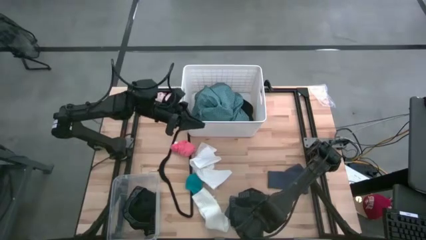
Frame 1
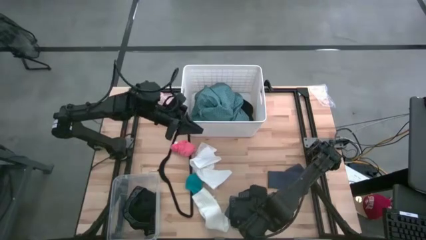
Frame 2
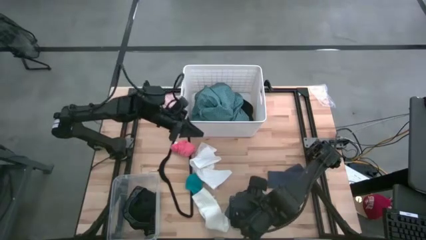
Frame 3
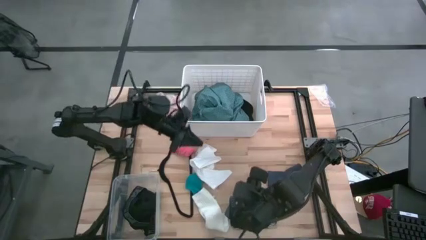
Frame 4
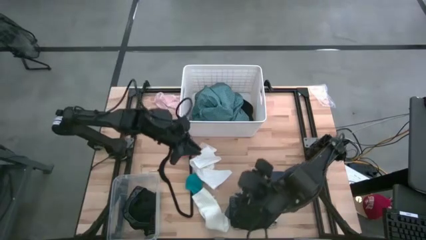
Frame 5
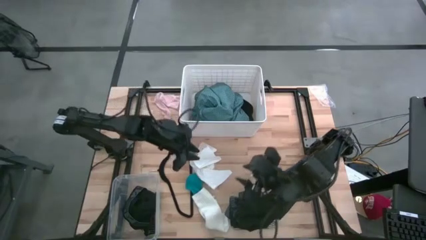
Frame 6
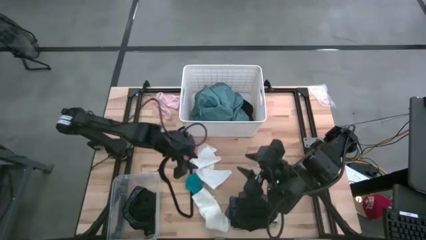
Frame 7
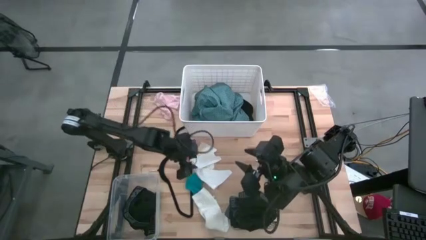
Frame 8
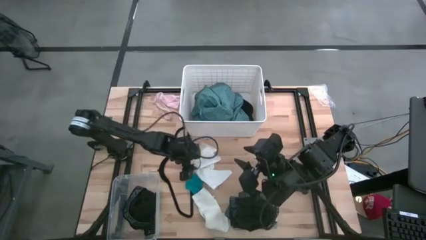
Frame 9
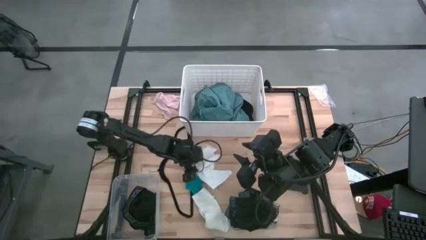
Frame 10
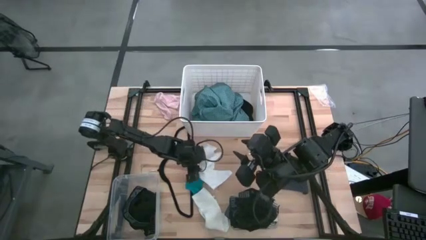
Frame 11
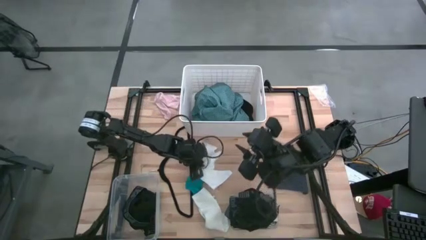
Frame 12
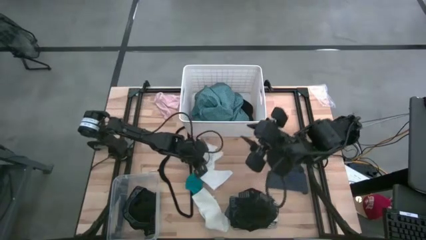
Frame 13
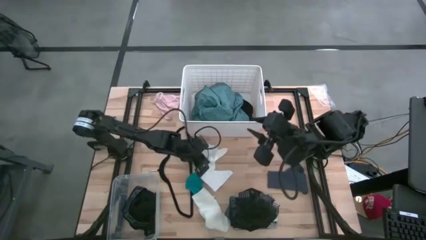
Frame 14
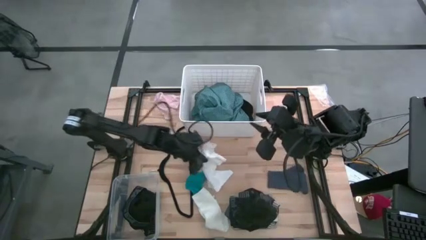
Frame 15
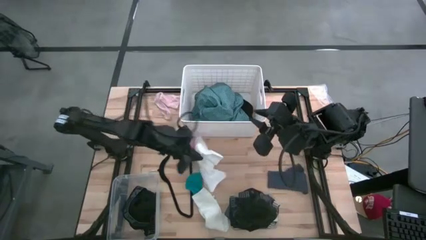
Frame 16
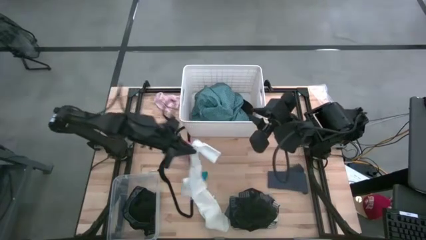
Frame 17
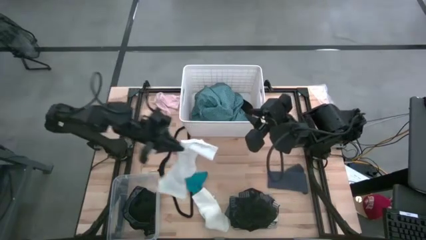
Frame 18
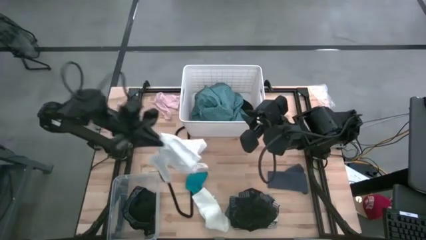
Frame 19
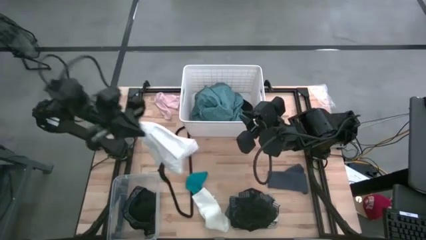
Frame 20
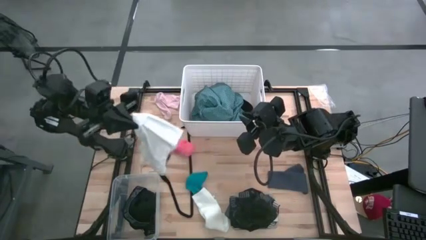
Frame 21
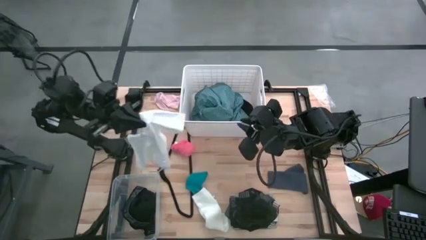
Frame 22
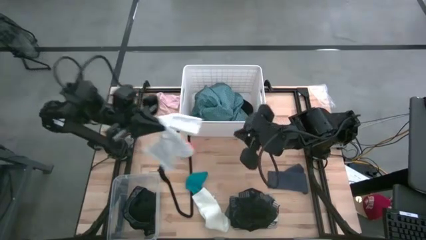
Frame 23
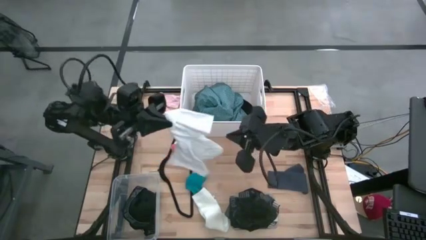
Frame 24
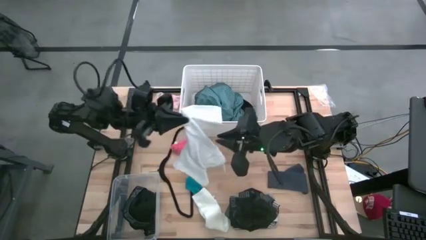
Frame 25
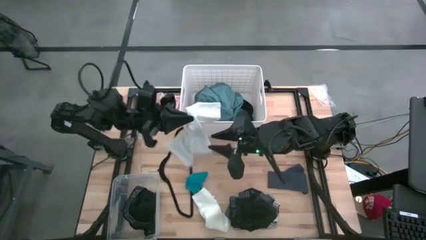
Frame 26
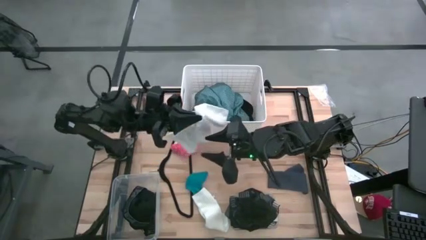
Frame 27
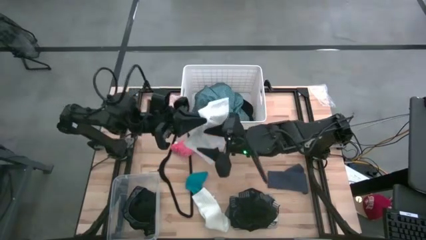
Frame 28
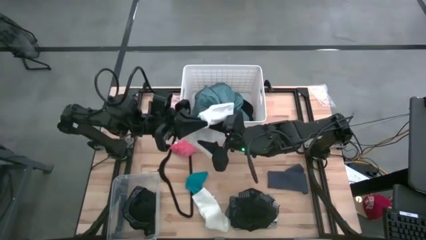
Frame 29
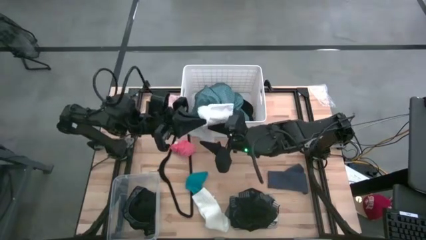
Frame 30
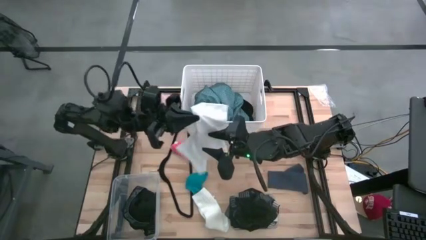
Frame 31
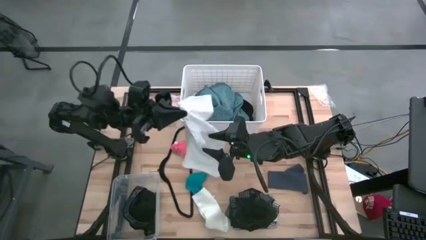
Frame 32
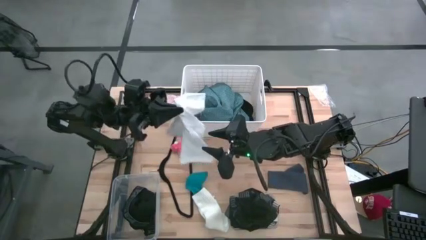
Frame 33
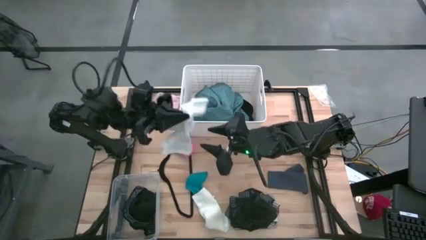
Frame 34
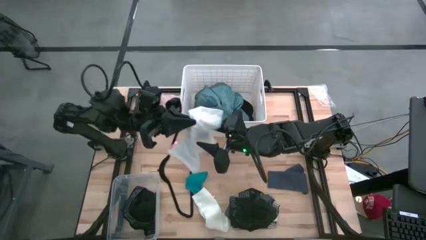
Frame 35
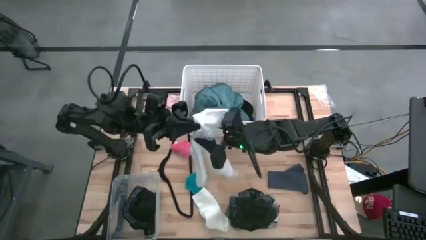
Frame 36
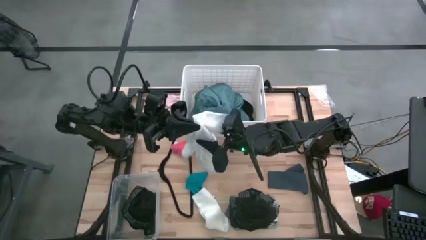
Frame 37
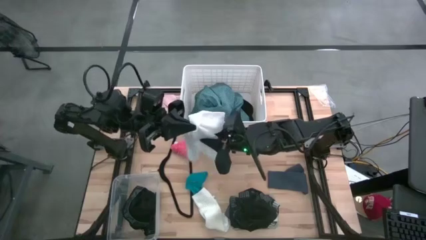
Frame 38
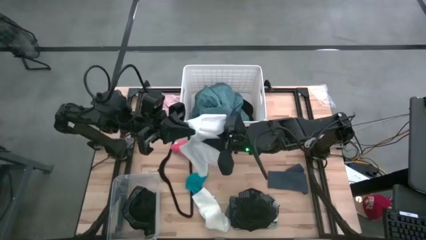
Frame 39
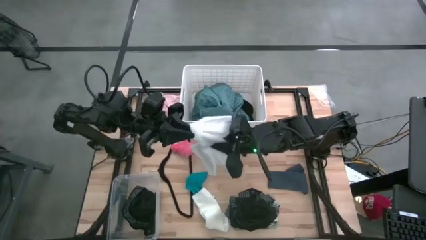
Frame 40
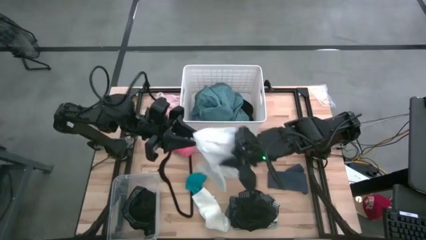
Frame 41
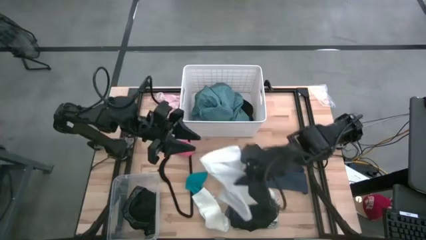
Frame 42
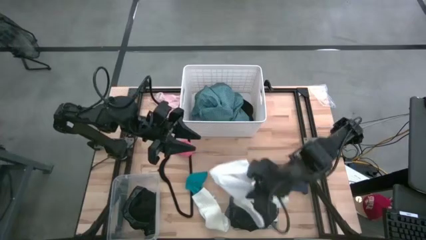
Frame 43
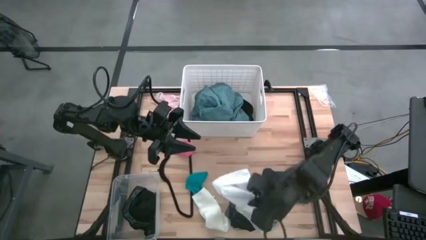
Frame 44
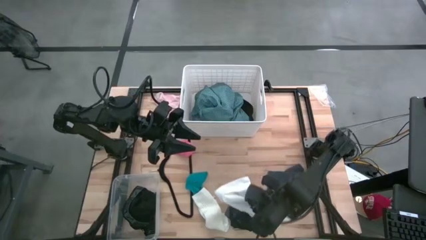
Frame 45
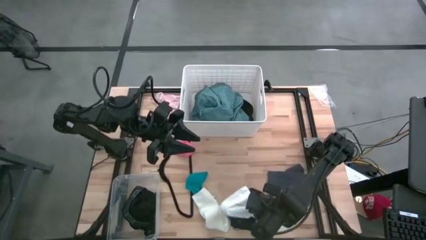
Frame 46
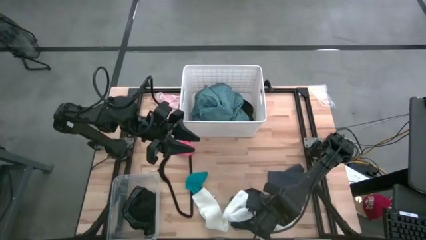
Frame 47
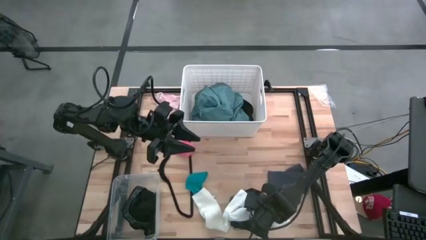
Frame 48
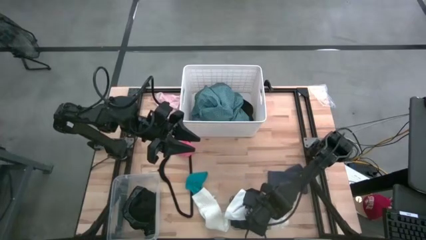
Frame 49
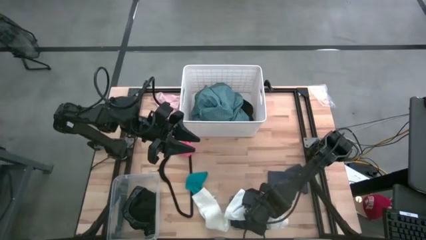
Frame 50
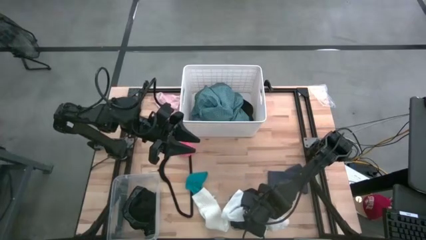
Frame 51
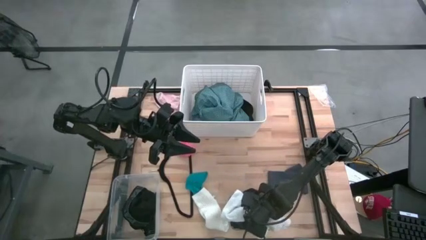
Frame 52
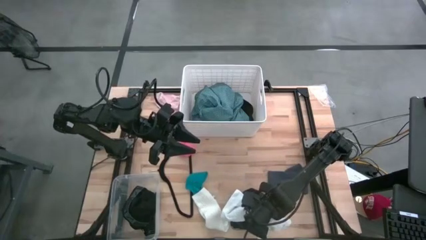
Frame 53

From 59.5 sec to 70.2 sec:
Task: Pick & Place Cloths
Put the white boxer into the right transparent bin
